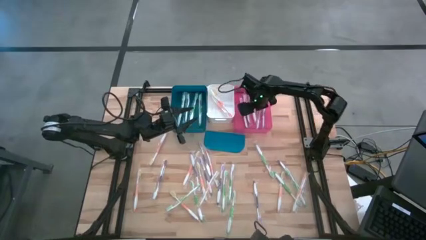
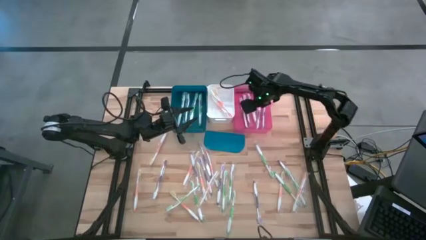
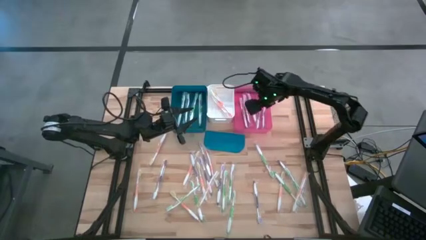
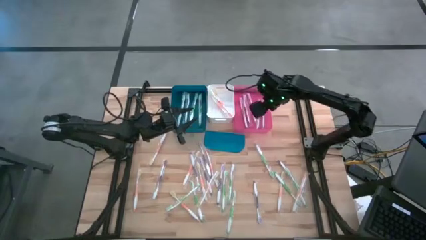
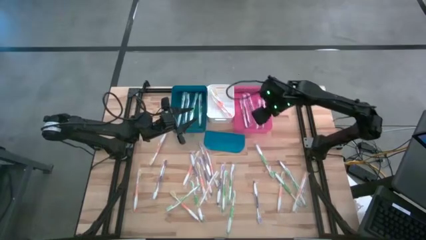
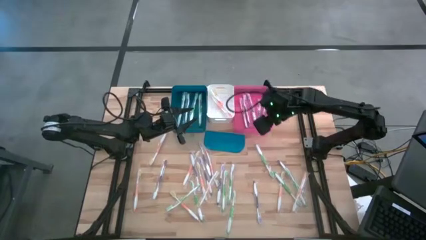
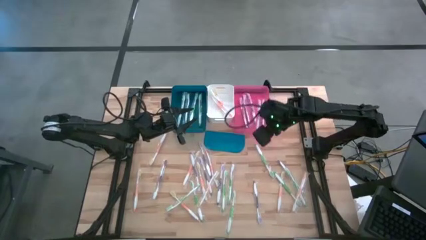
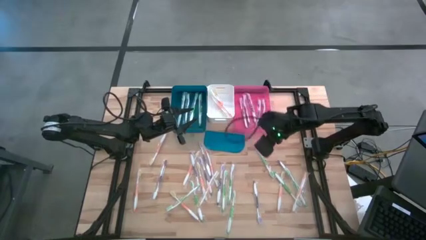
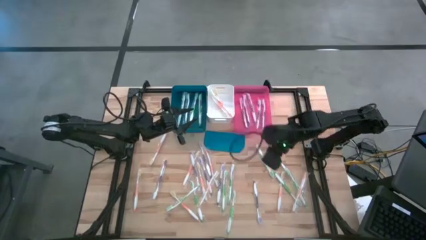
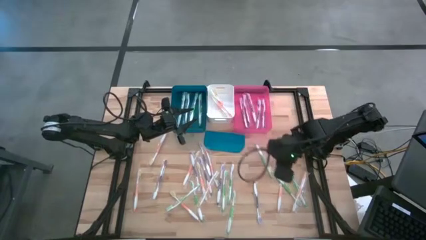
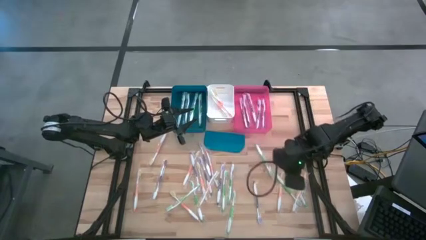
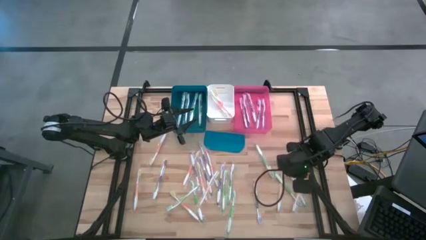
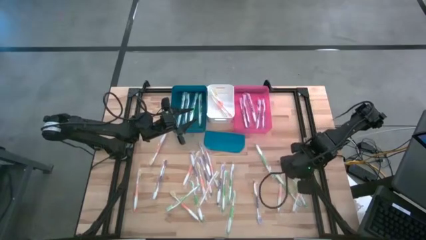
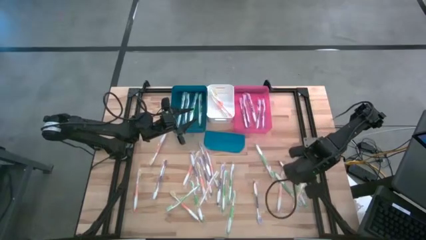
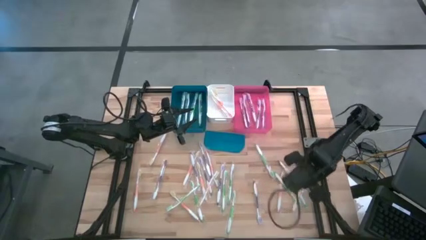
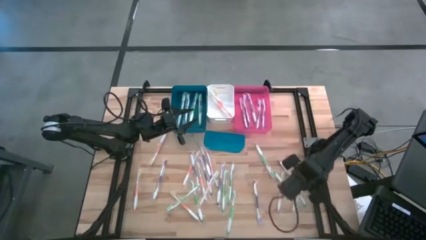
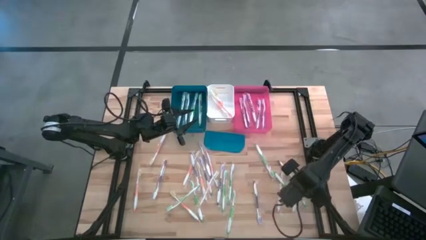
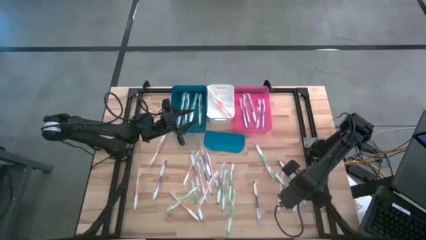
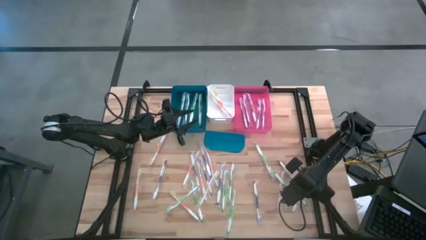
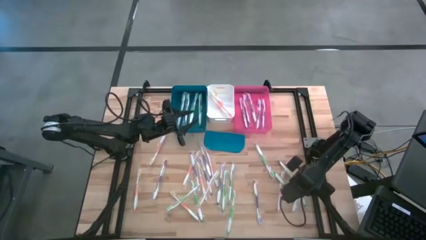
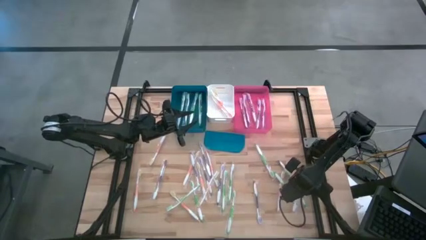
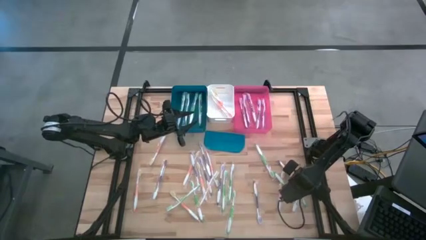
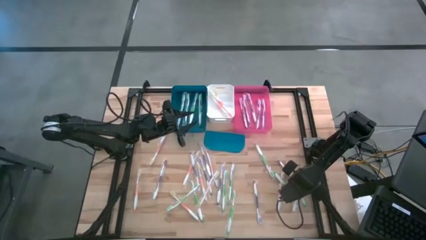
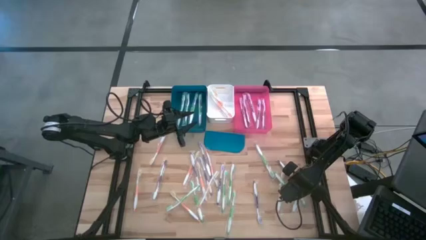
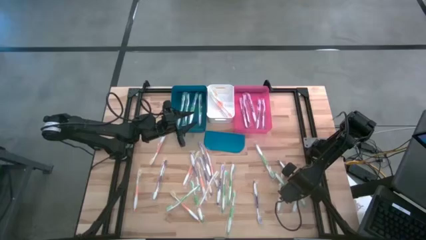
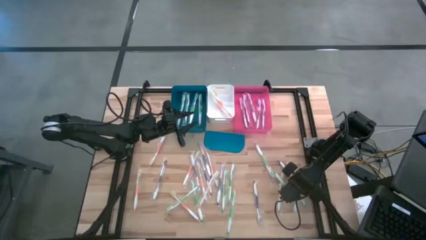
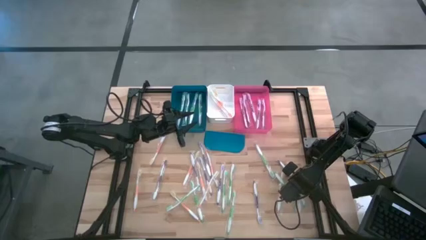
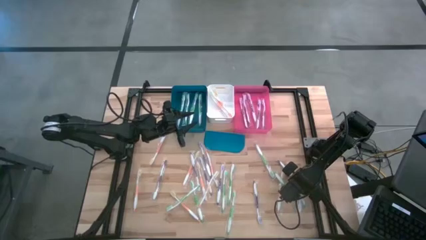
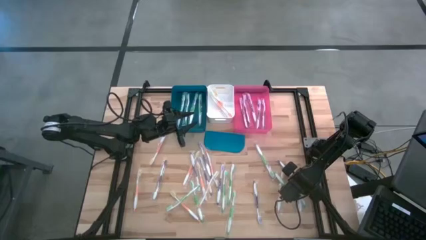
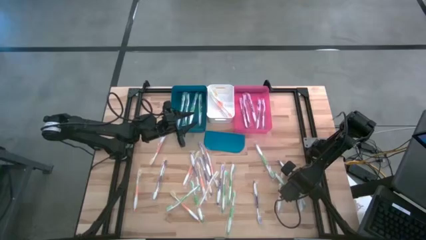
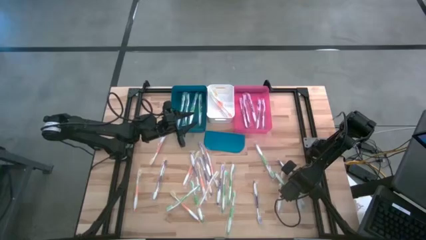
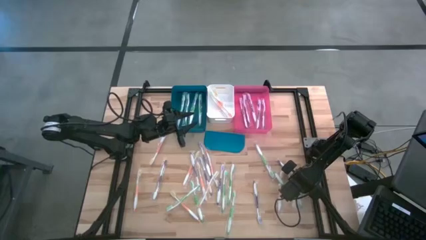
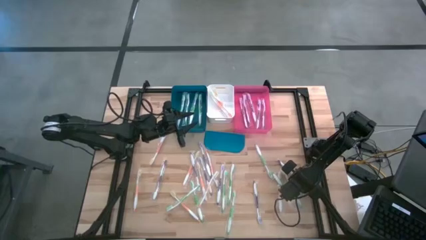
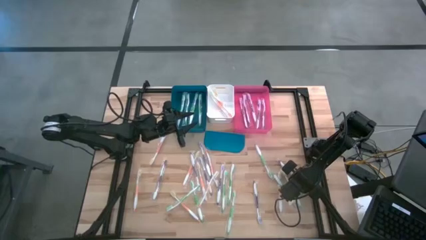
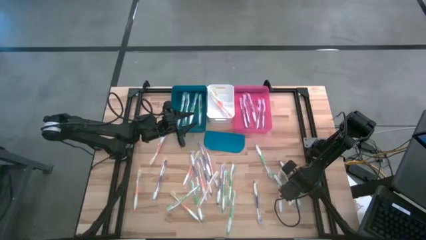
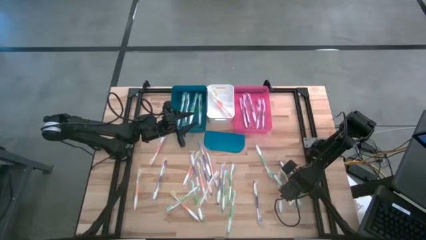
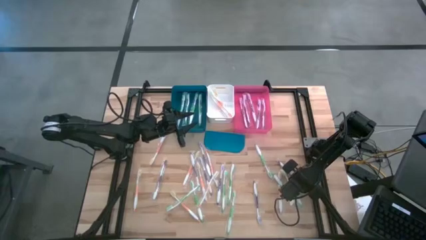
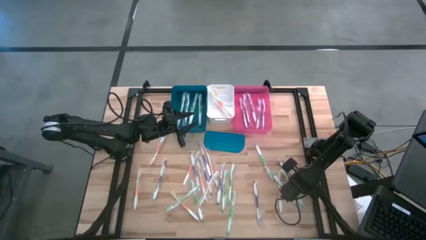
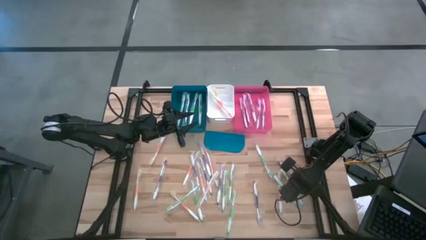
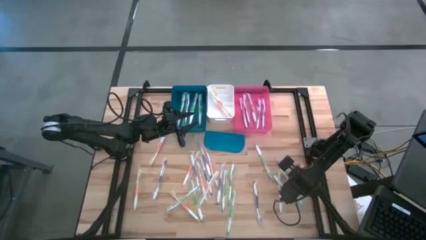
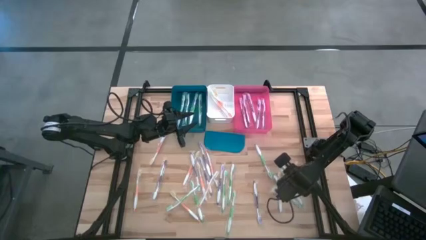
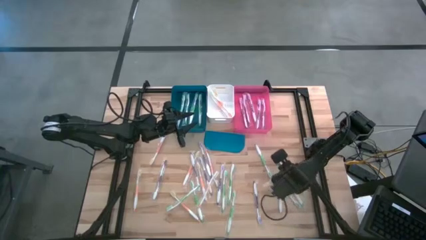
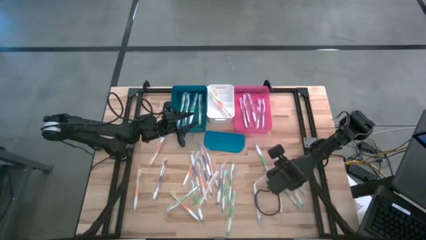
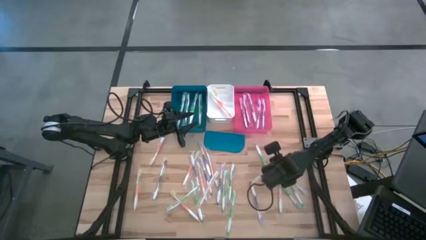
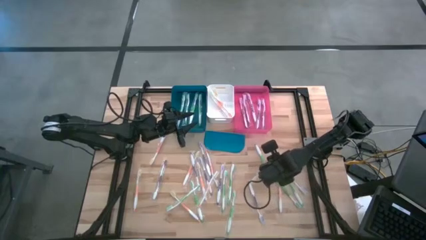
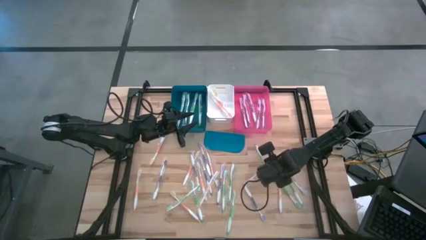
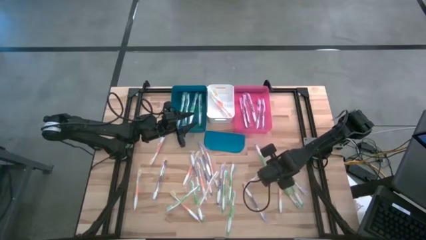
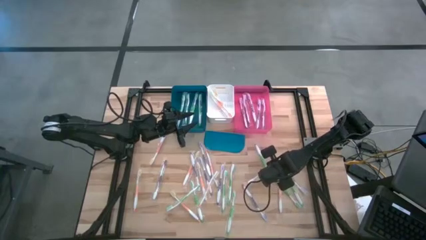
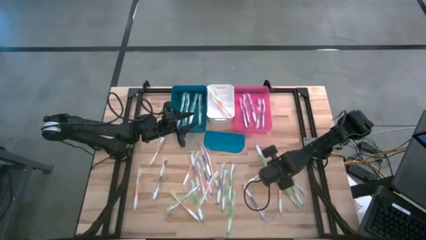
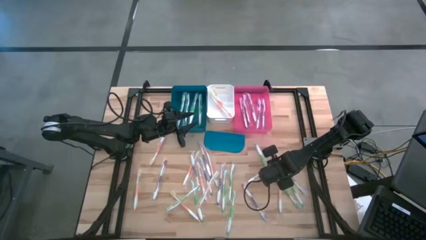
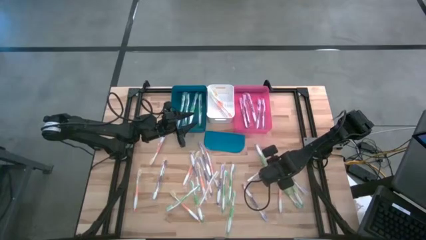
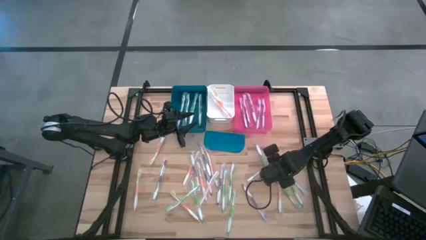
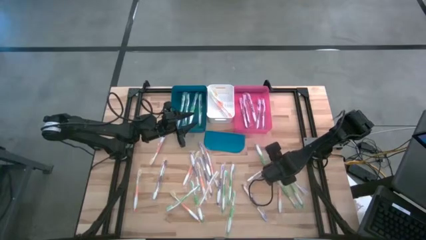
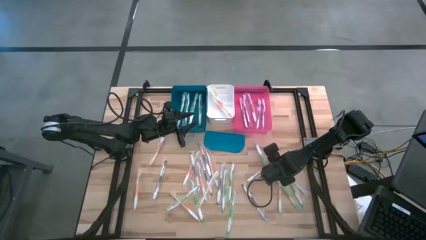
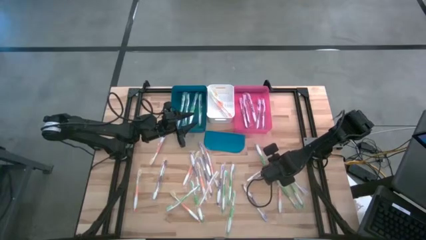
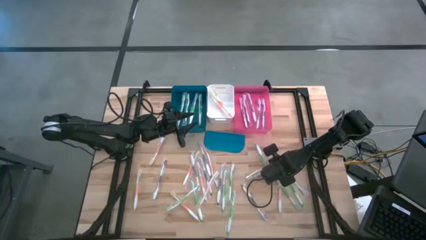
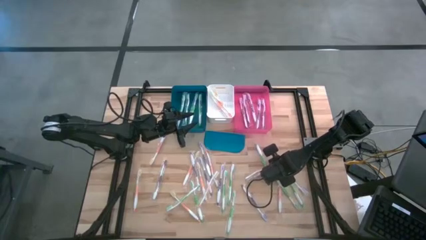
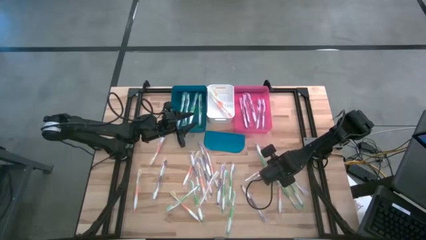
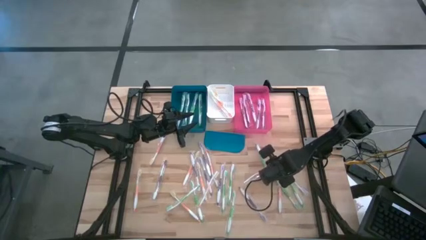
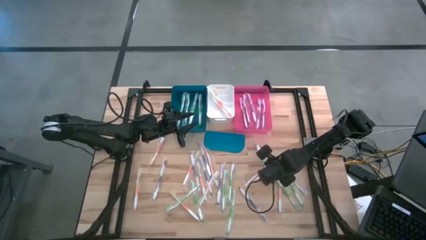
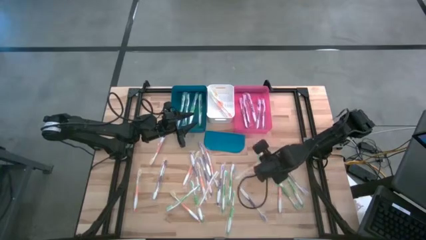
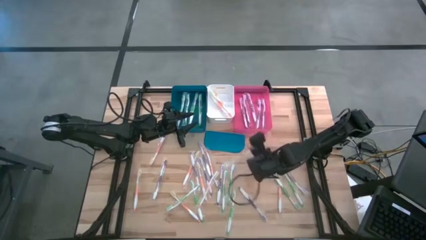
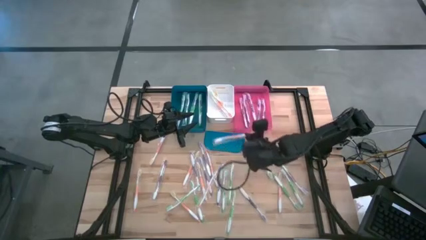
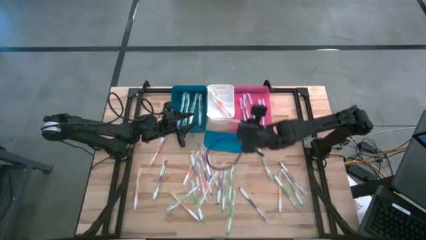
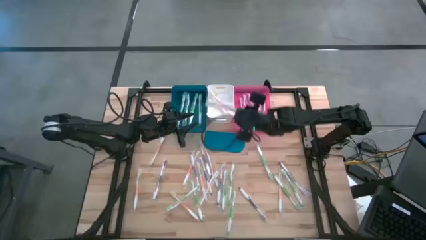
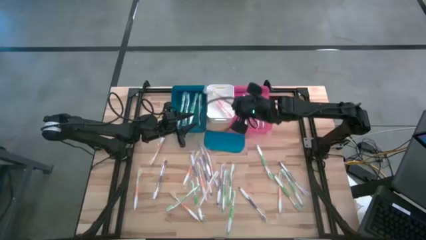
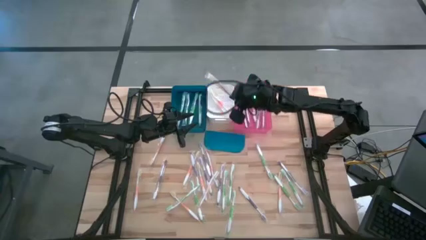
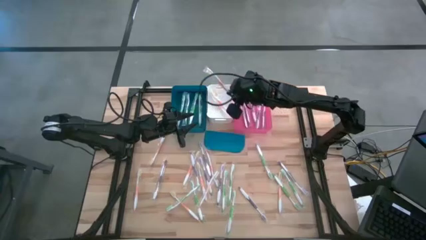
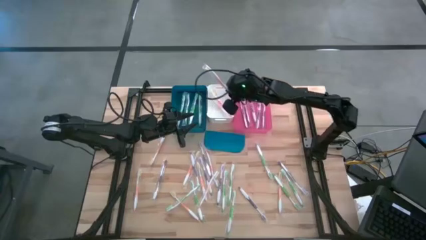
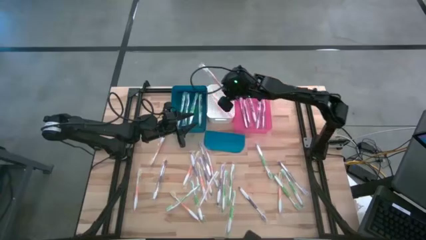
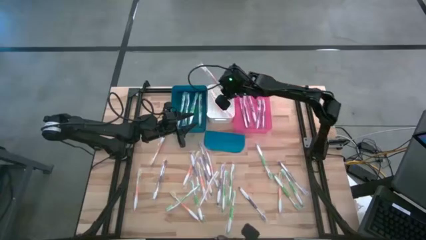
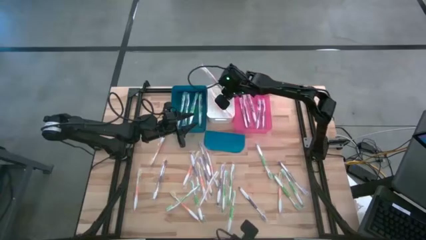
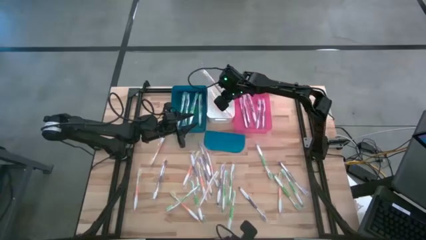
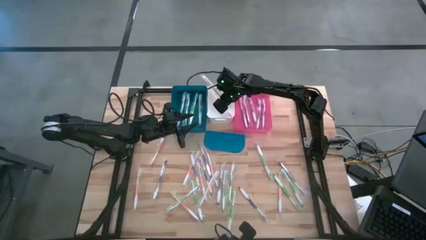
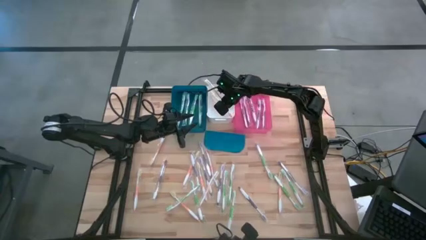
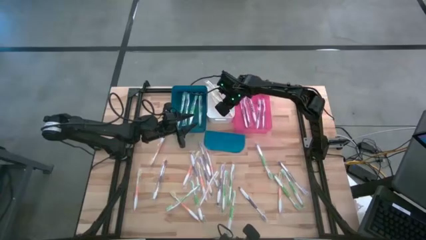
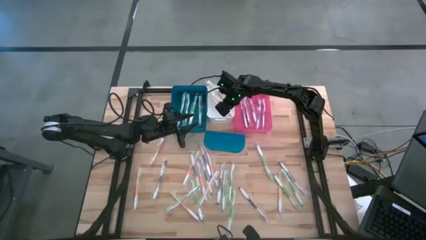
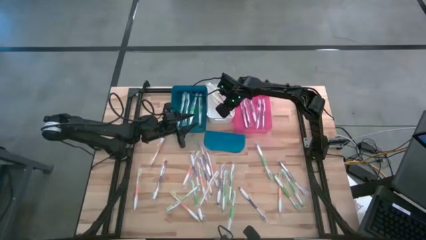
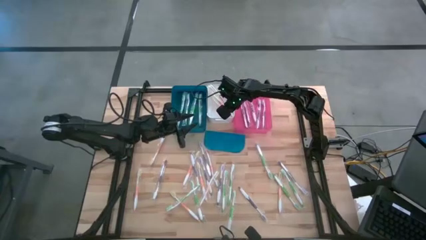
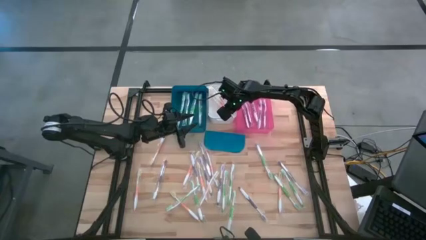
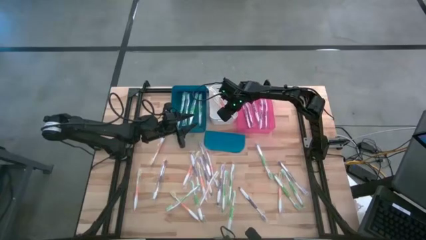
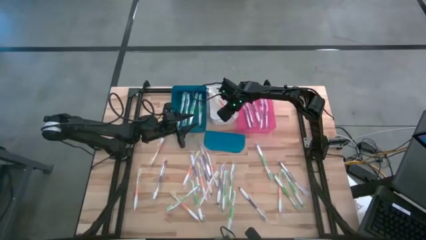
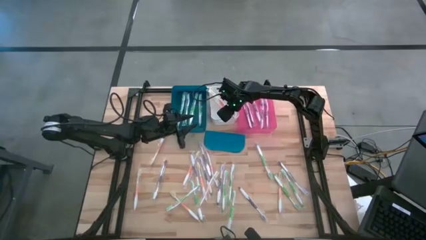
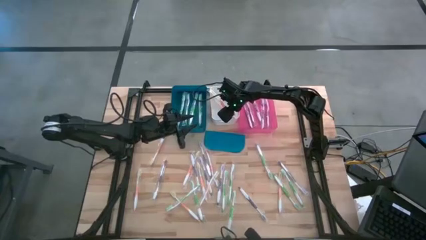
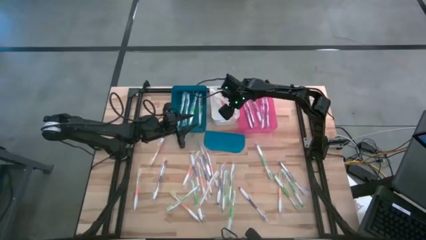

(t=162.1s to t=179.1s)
Task: Pick & Place Toothbrushes
Put the orange toothbrush into the white bin
